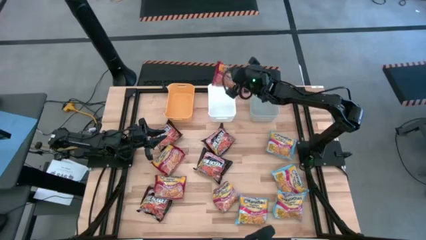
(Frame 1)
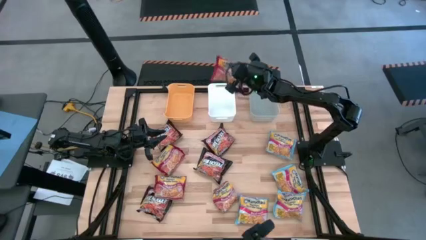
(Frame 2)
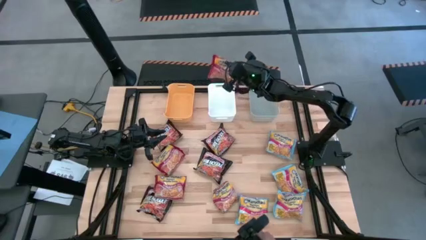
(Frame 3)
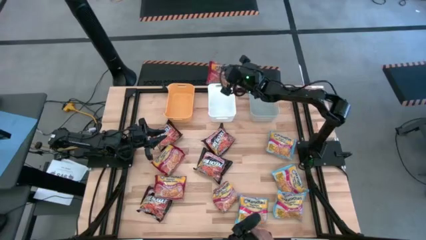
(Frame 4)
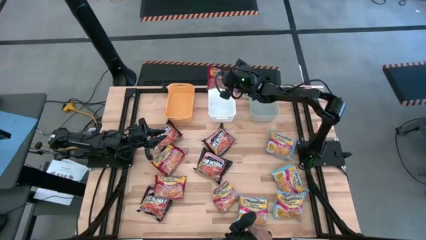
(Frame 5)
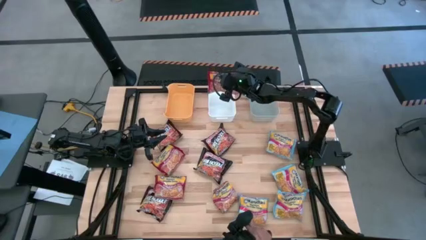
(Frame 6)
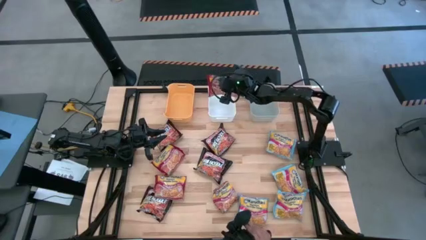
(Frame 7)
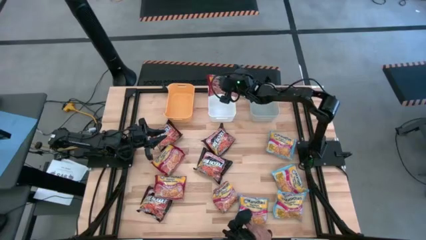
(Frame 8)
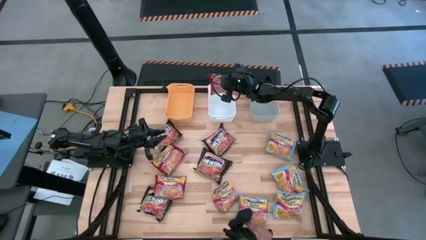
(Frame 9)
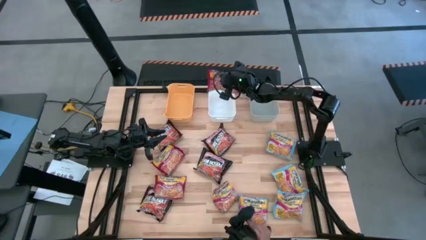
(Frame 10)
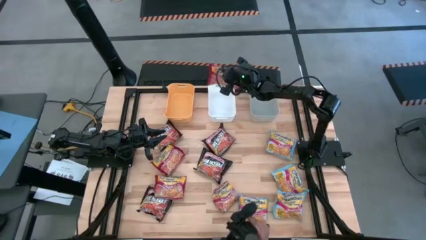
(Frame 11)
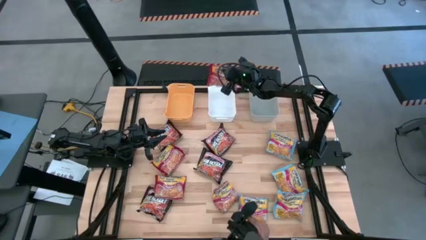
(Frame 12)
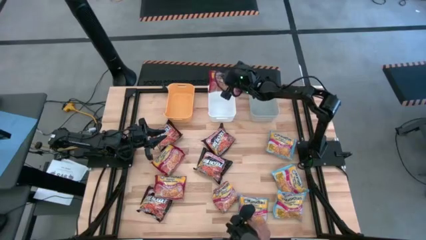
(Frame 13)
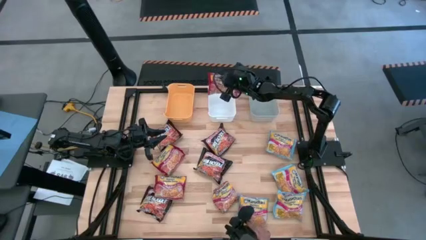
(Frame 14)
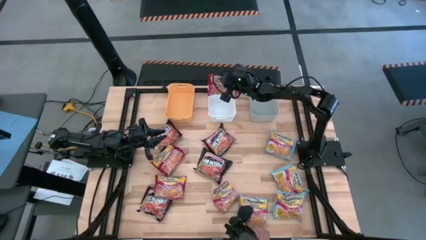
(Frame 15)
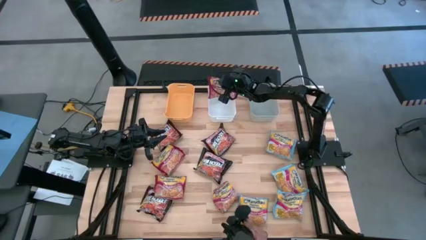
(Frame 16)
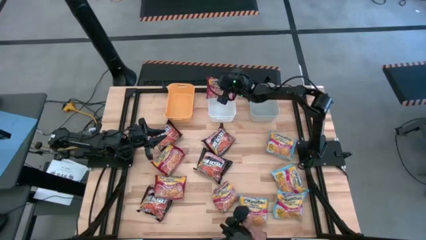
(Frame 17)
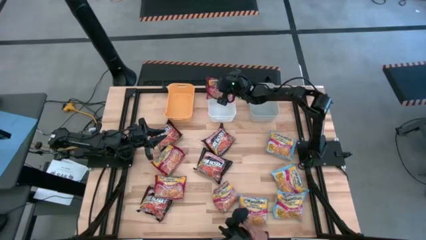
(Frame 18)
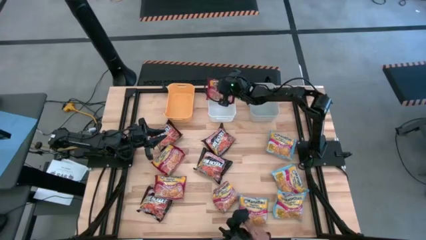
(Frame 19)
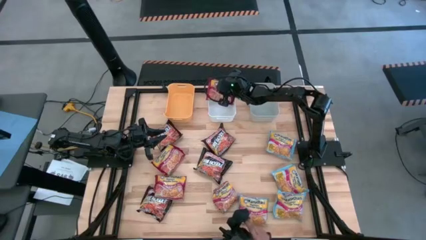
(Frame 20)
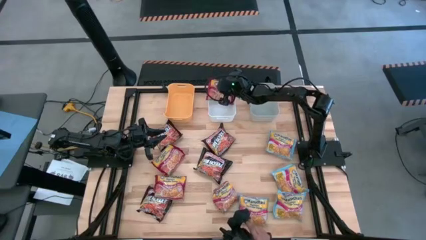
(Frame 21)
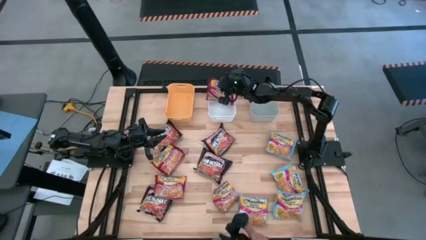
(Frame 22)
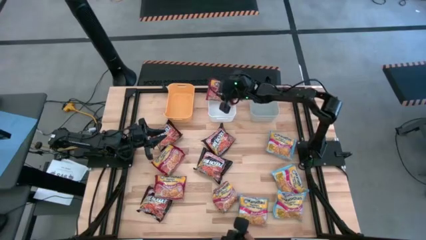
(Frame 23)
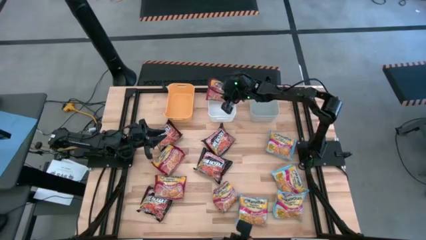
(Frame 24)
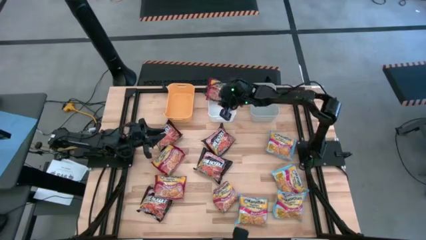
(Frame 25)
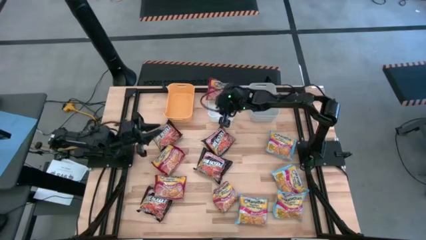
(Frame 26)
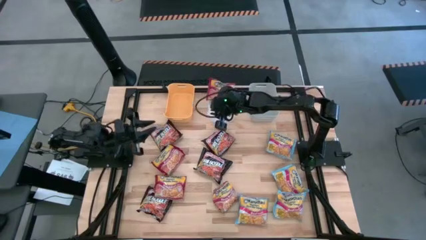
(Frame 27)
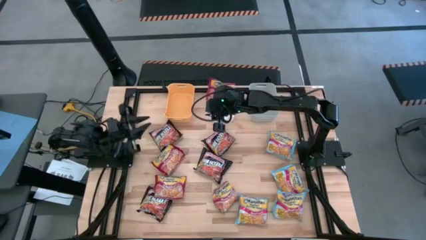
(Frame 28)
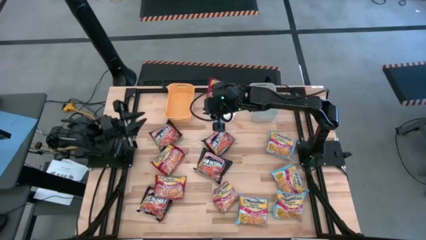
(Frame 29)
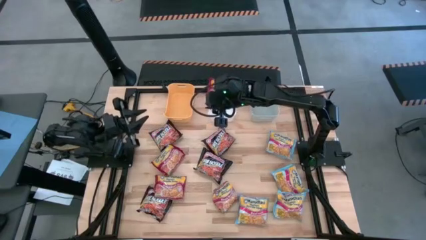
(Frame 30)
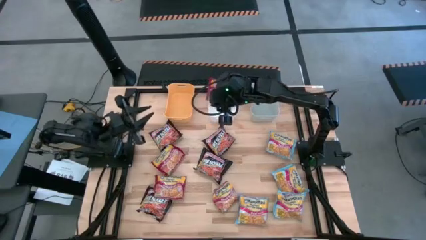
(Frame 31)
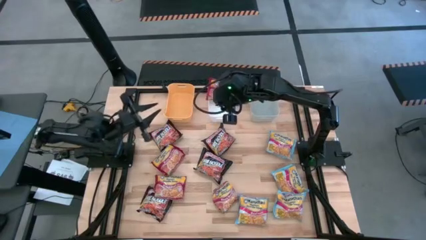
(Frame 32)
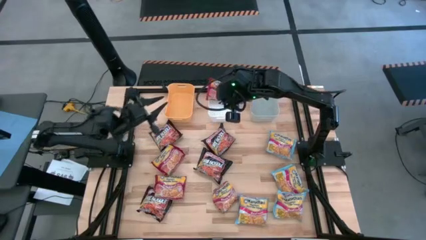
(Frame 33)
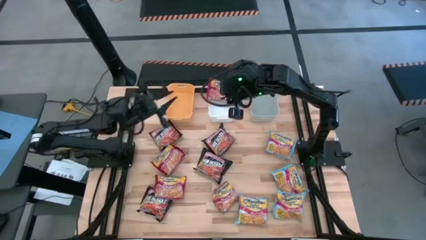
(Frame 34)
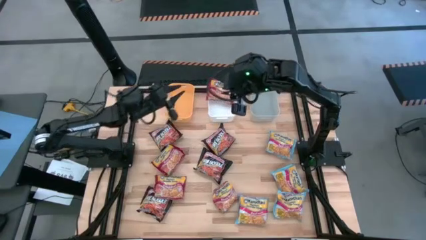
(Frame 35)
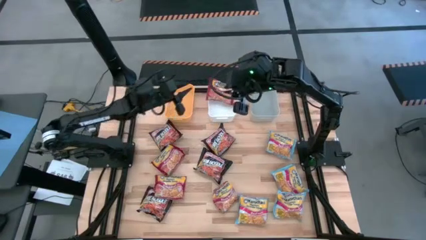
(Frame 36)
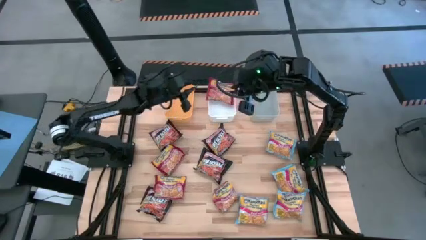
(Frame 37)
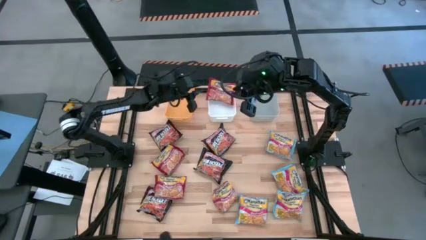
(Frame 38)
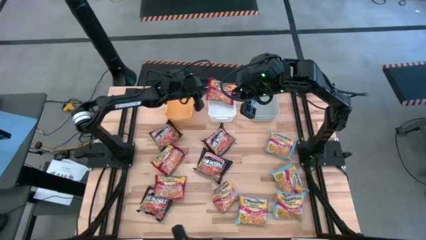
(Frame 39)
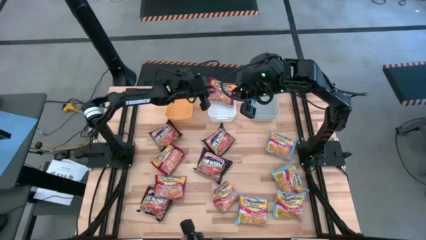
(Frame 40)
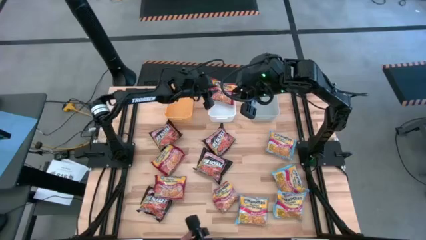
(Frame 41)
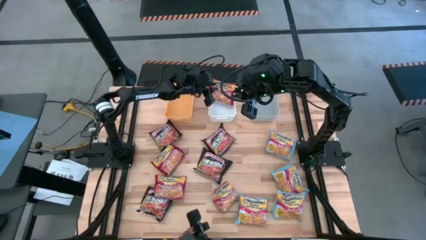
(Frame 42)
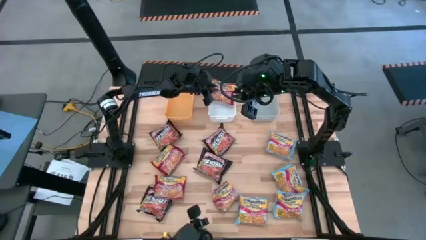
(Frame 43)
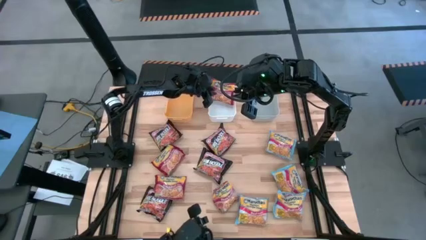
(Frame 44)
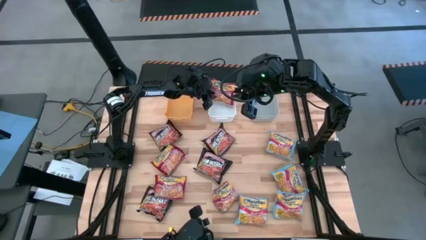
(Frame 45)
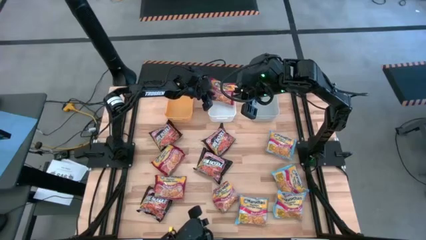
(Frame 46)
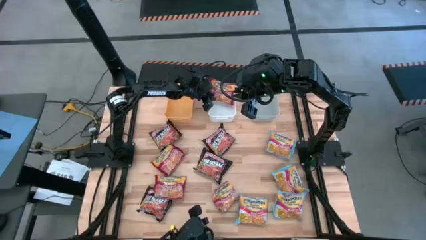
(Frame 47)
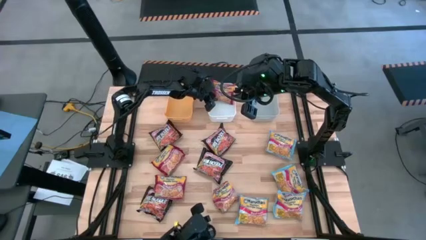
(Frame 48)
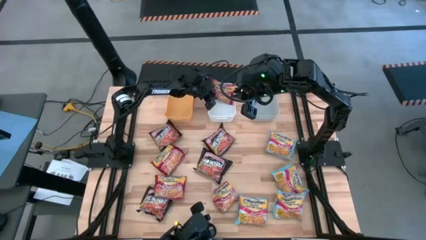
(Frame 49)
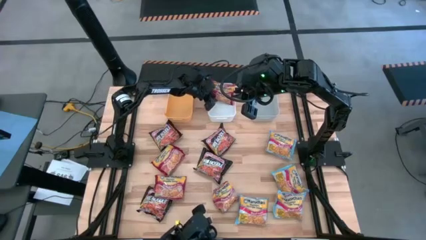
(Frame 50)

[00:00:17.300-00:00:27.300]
Task: Sort Maruchan noodles
Put the red noodle pack into the white bin

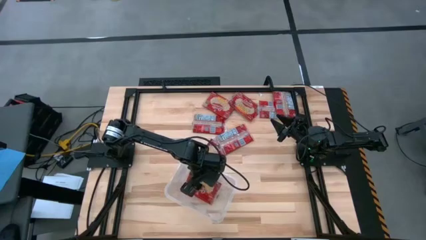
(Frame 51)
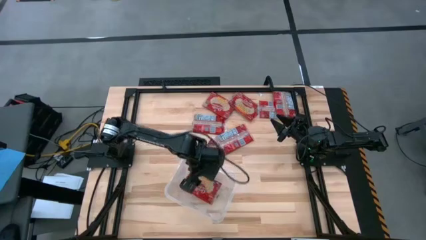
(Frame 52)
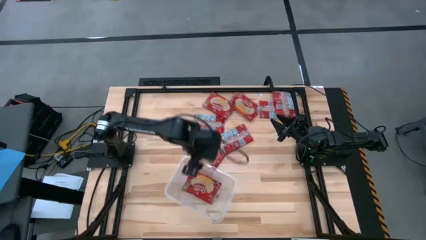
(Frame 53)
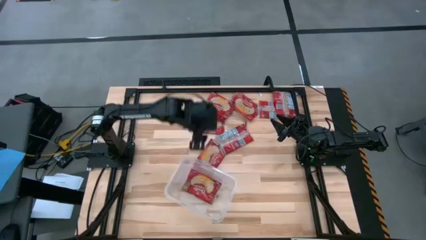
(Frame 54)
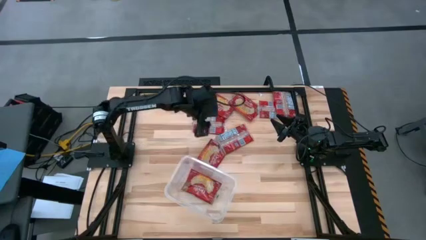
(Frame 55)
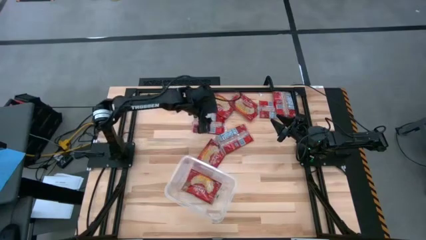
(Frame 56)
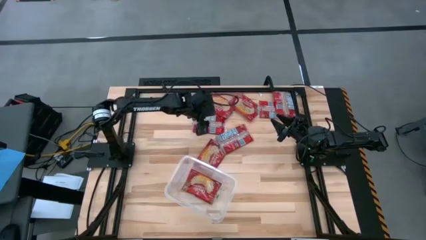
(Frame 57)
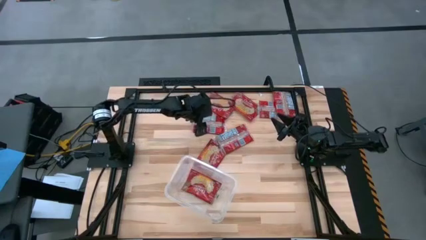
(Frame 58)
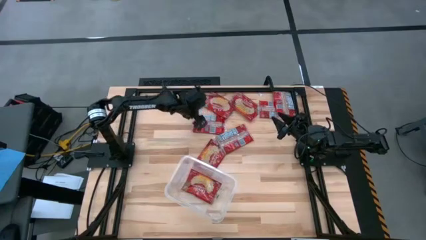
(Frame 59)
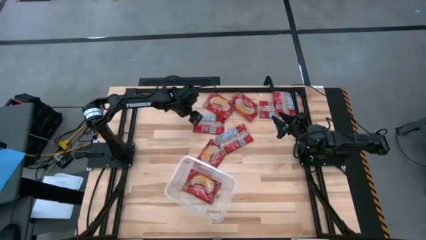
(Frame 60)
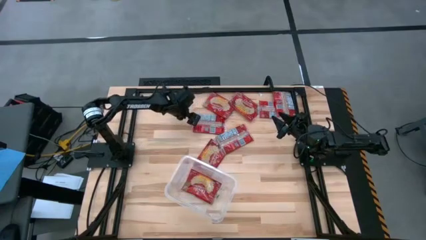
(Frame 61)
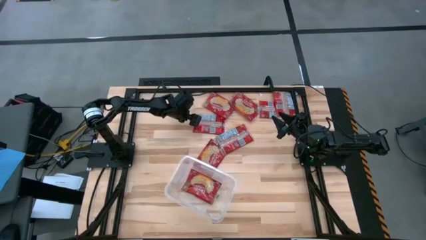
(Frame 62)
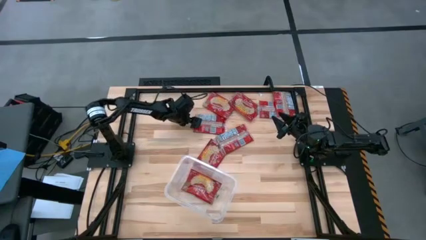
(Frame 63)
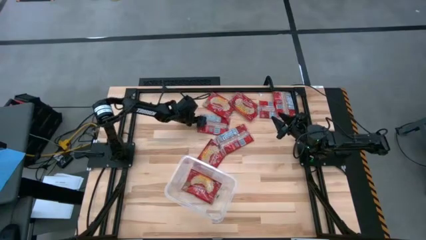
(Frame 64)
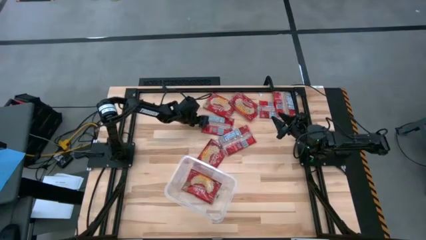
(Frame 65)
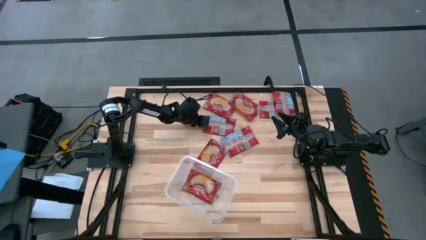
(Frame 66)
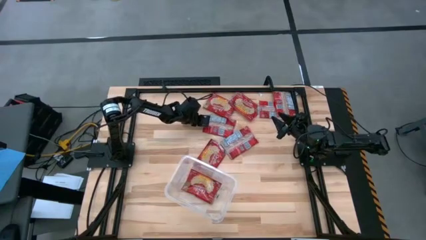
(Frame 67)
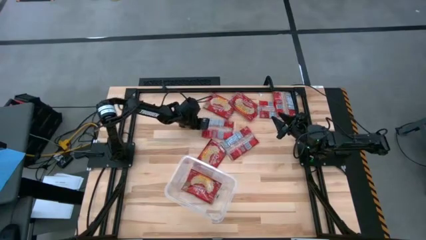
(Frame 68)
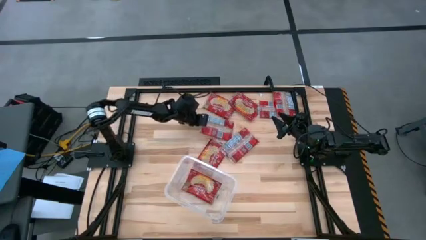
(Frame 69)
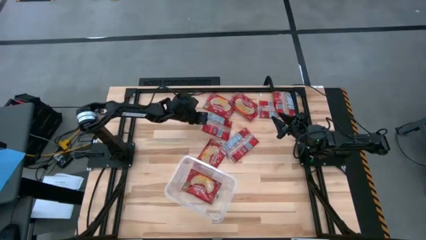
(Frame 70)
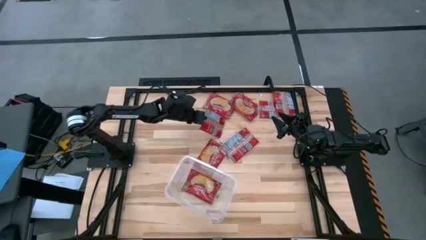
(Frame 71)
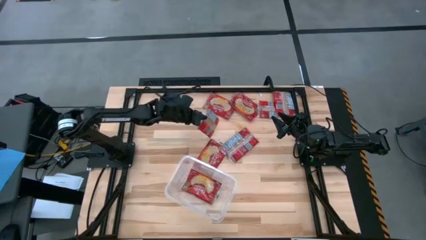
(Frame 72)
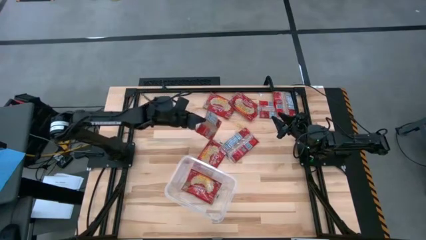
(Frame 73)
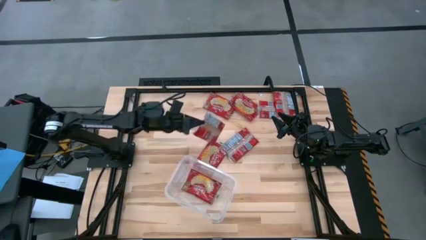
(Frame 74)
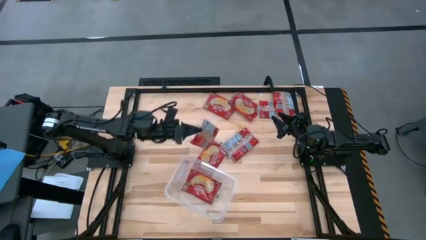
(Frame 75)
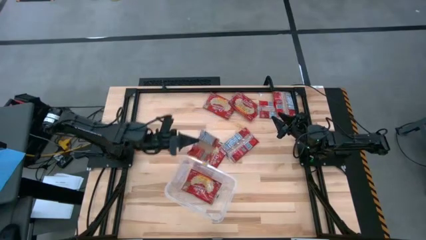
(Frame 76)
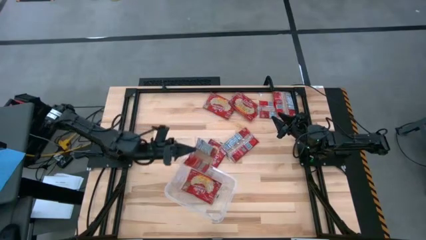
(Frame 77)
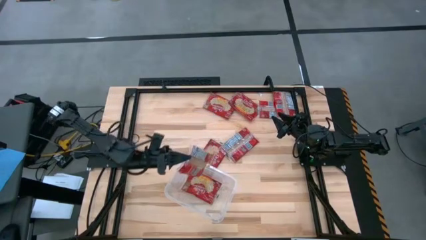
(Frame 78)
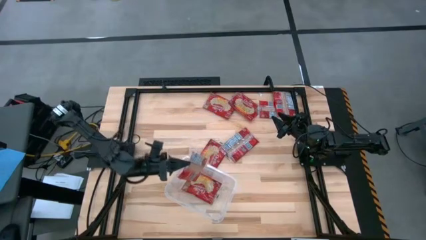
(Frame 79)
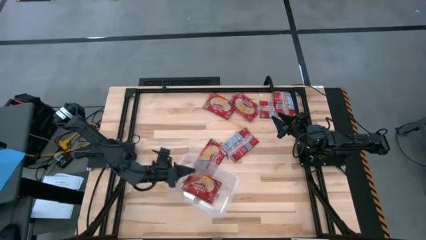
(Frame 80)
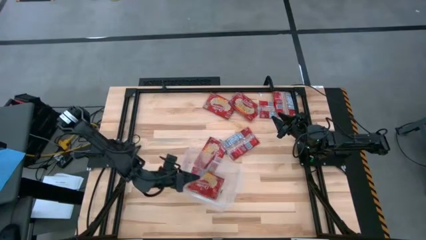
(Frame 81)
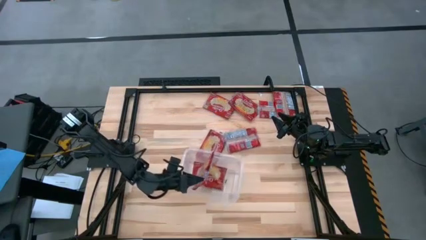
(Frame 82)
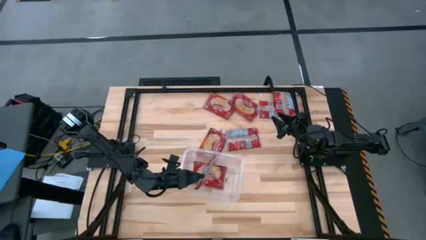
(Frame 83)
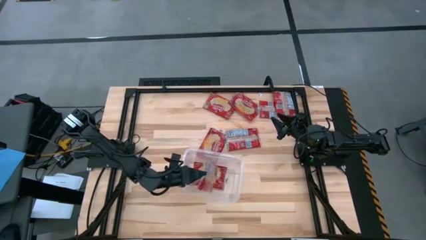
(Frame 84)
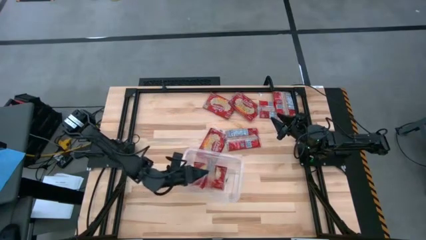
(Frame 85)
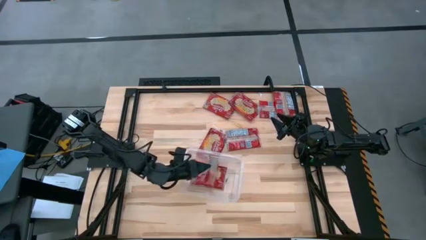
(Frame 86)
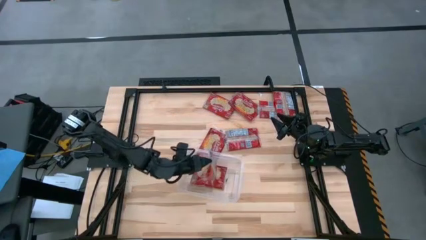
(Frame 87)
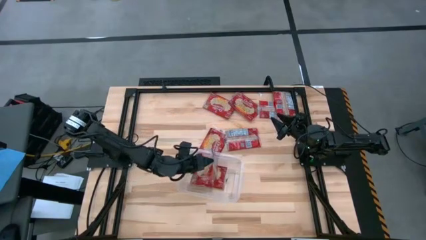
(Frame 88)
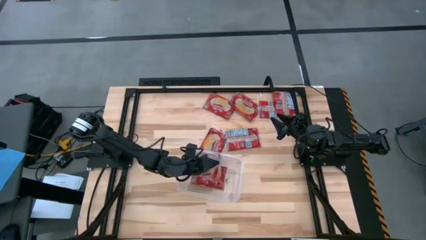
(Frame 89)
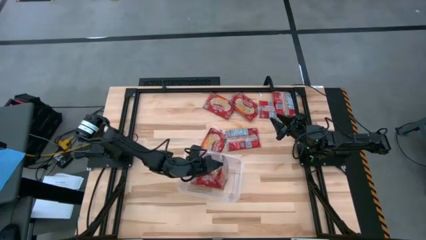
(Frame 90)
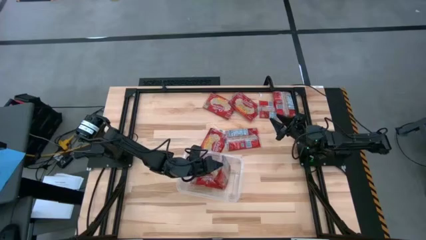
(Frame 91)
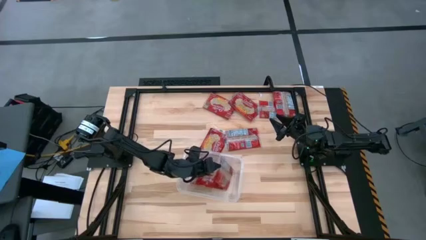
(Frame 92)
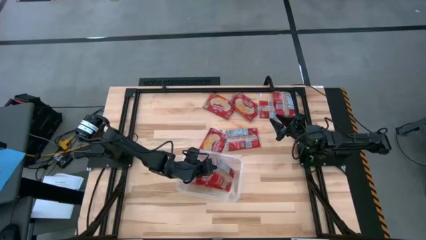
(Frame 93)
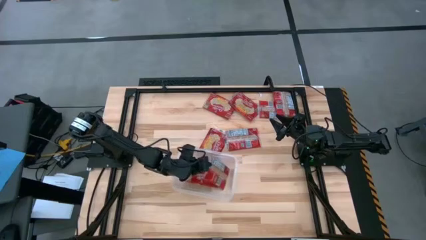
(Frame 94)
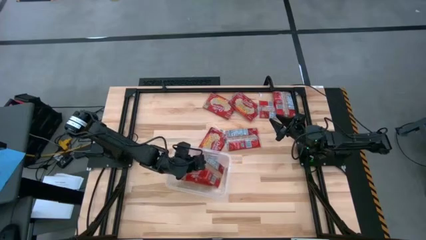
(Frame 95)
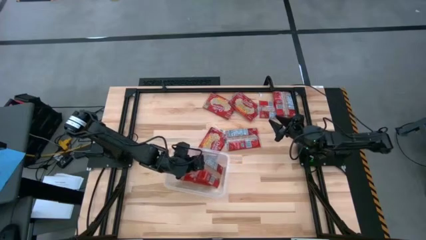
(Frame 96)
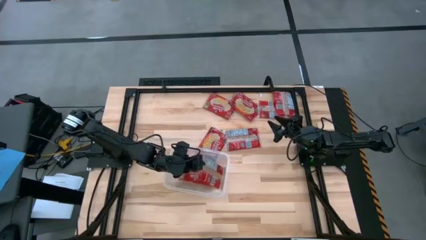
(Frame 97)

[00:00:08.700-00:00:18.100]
Task: Sort popcorn bags into baskets
Put the red popcorn bag into the container
